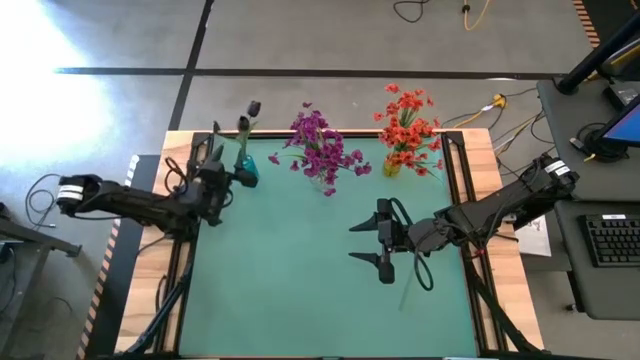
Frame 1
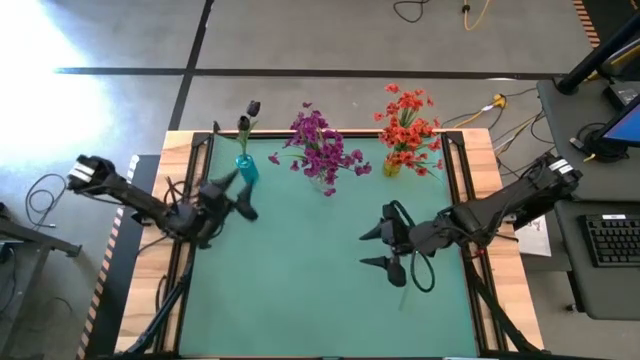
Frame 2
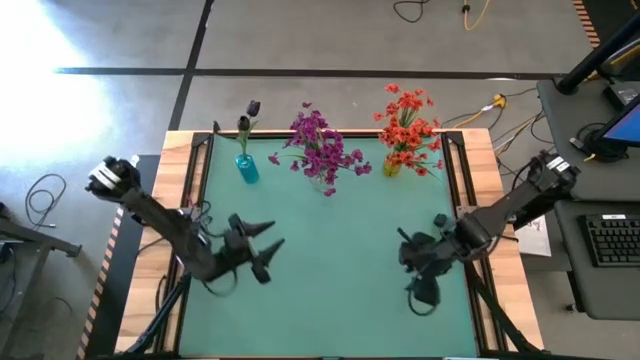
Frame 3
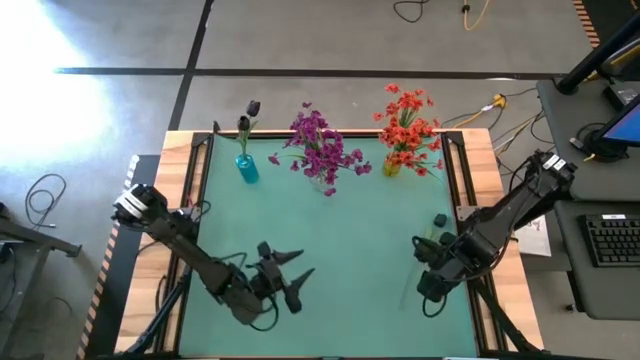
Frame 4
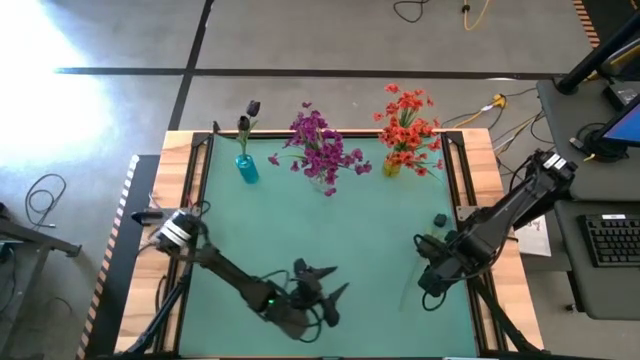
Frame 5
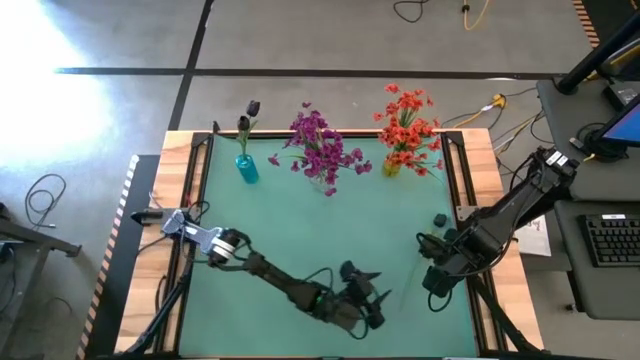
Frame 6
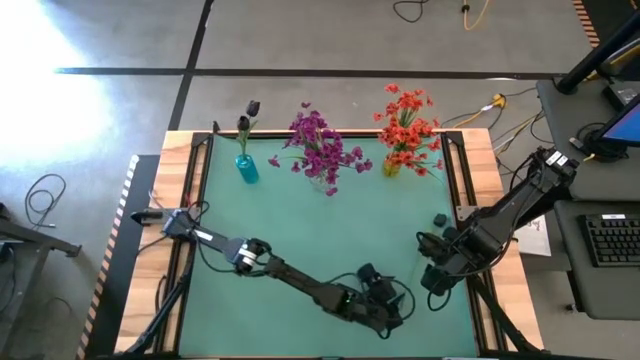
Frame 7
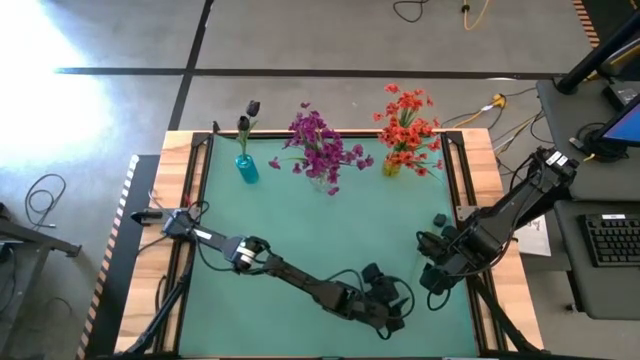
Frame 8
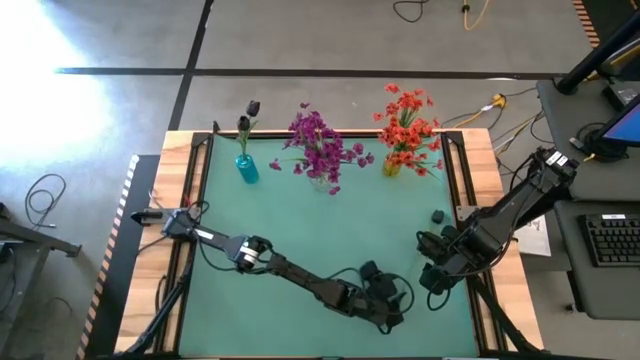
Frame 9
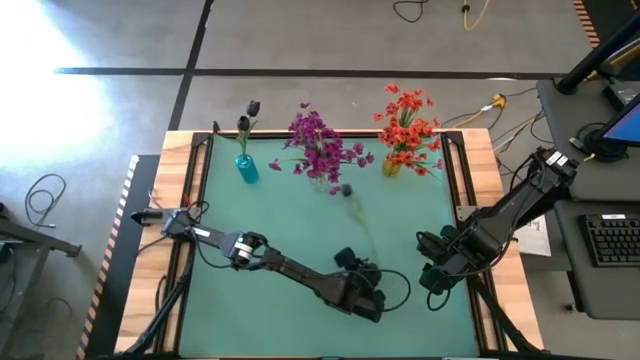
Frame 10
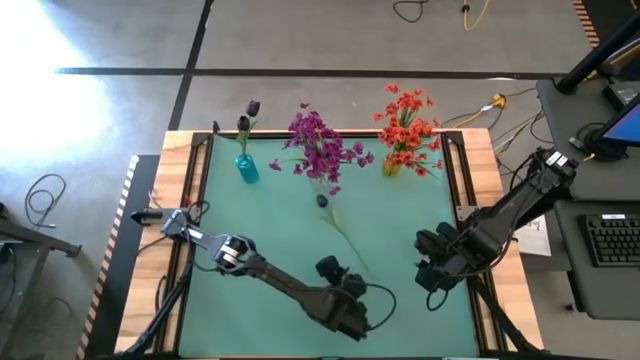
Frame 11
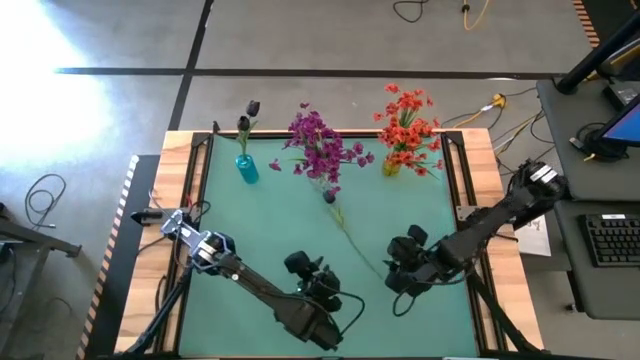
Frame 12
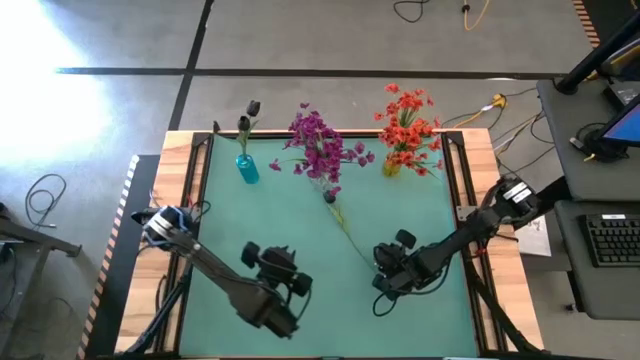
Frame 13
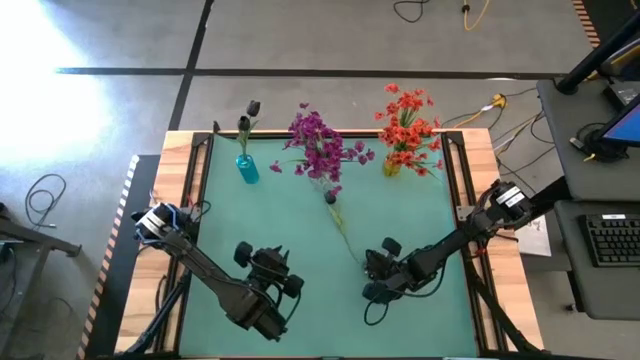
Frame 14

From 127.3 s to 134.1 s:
Task: Sort flowers into vase by color
Put the black flower into the blue flower vase

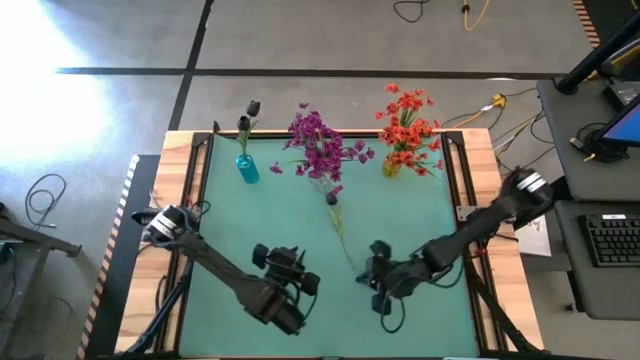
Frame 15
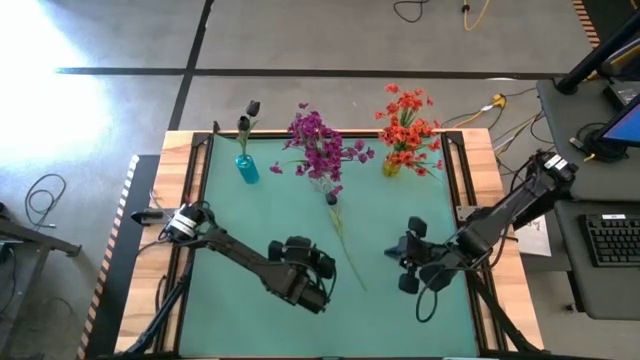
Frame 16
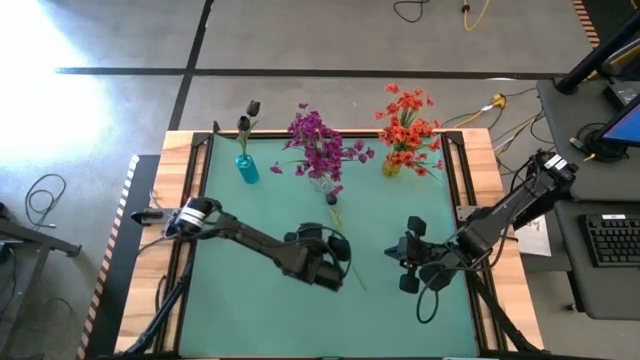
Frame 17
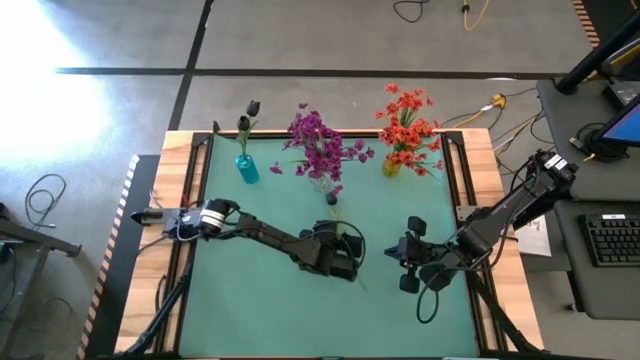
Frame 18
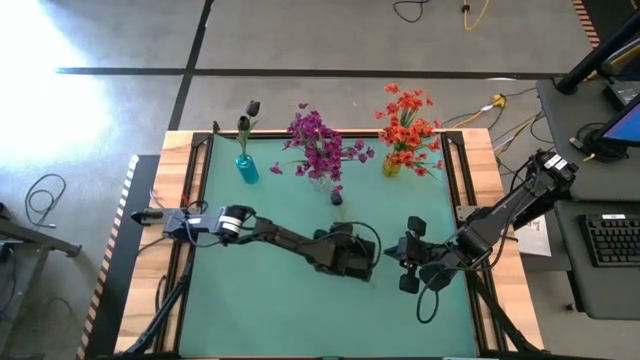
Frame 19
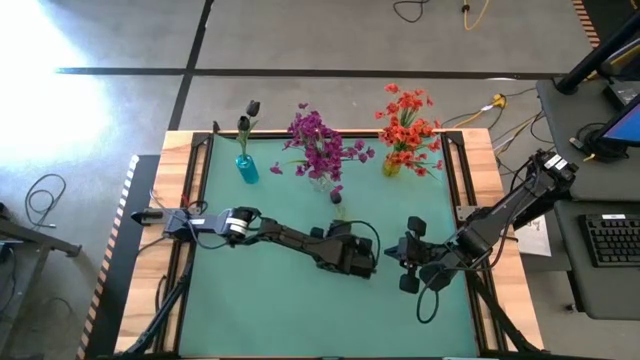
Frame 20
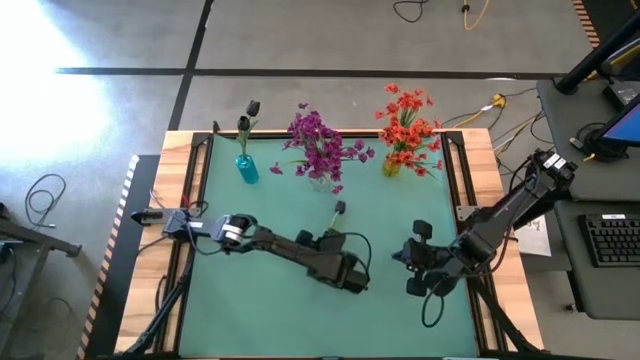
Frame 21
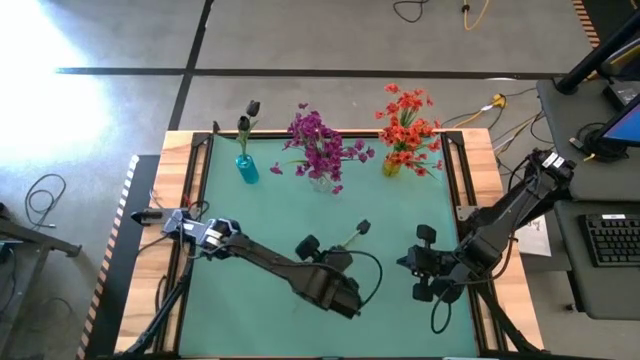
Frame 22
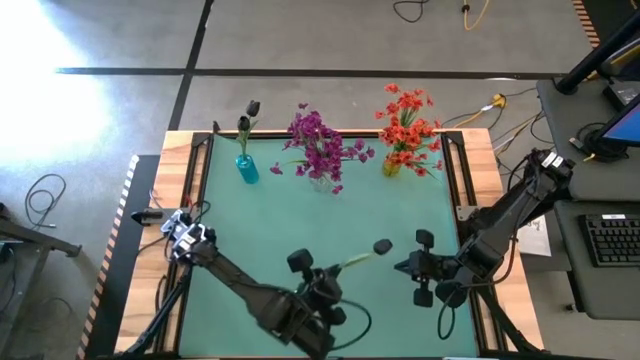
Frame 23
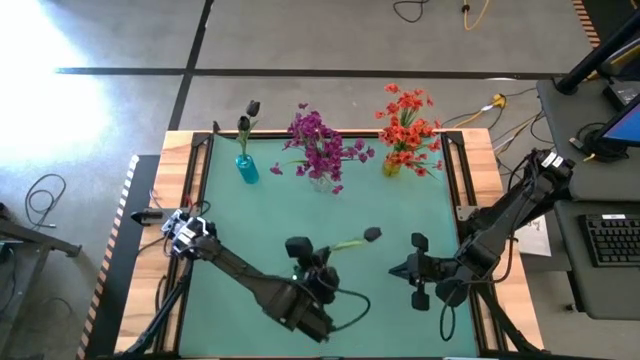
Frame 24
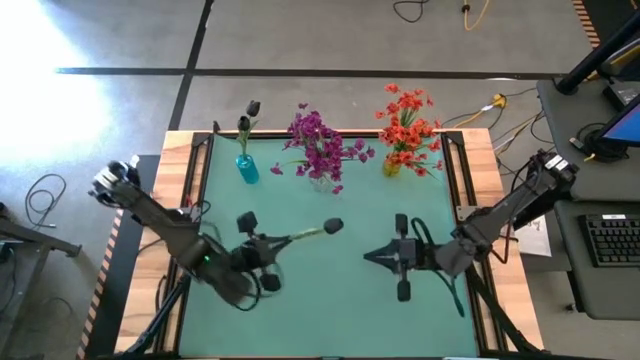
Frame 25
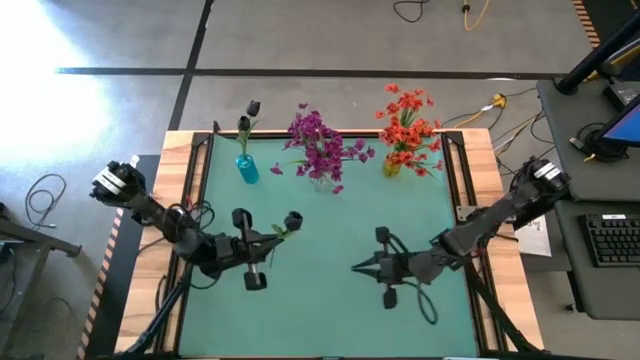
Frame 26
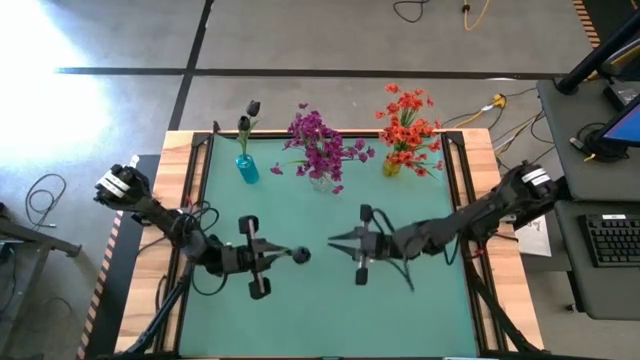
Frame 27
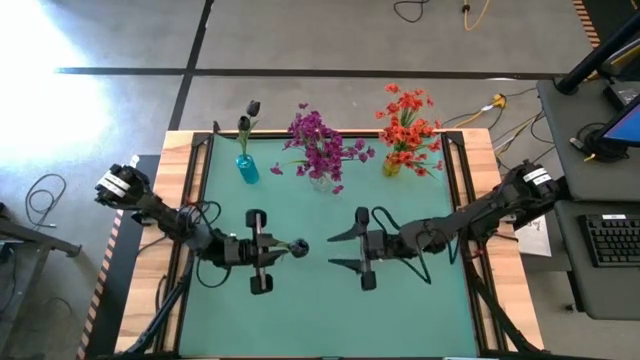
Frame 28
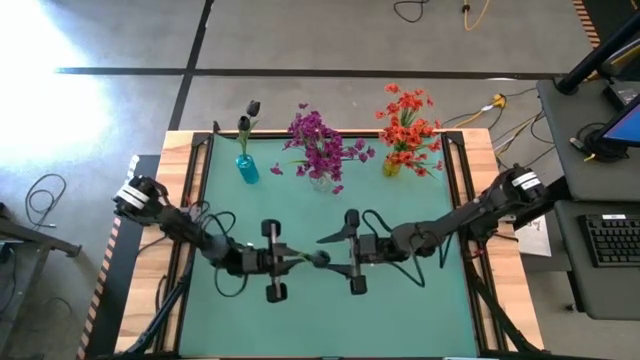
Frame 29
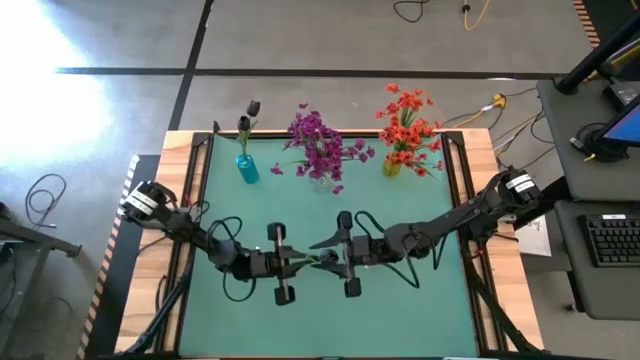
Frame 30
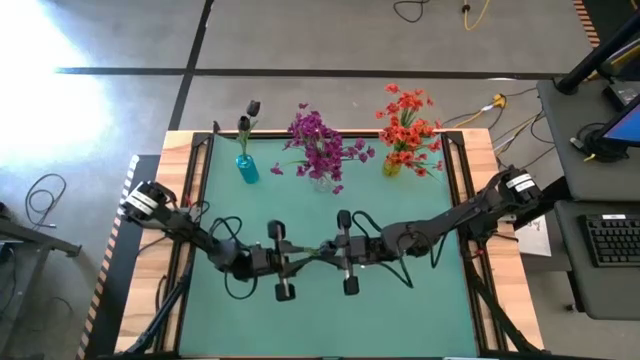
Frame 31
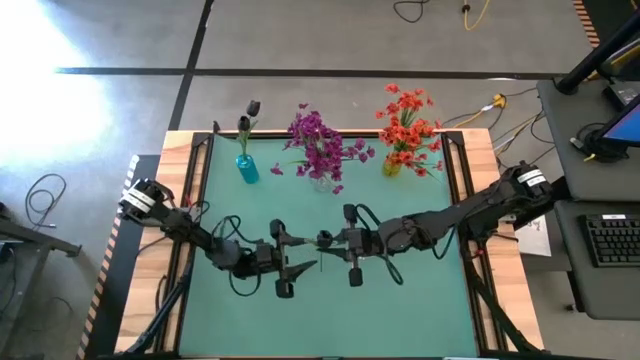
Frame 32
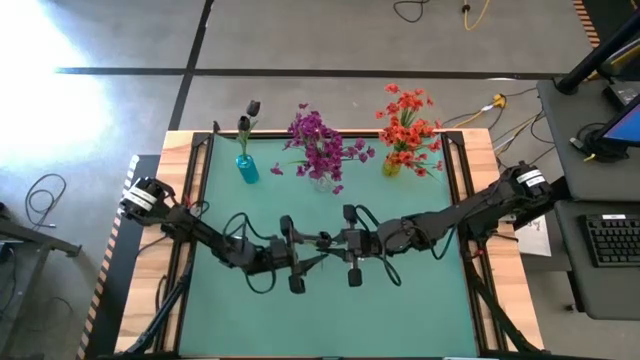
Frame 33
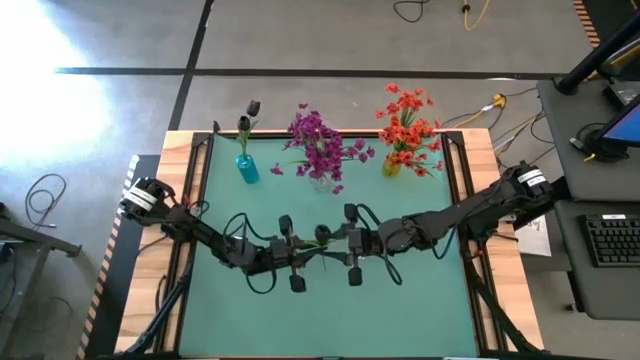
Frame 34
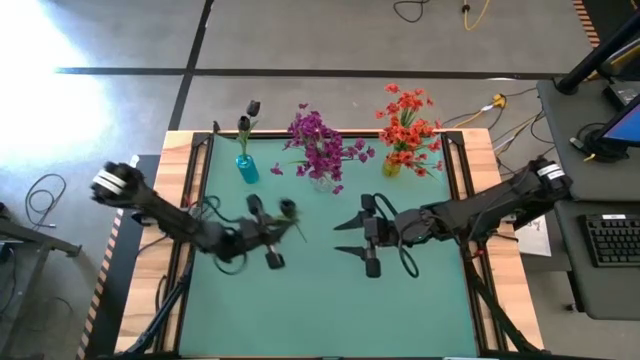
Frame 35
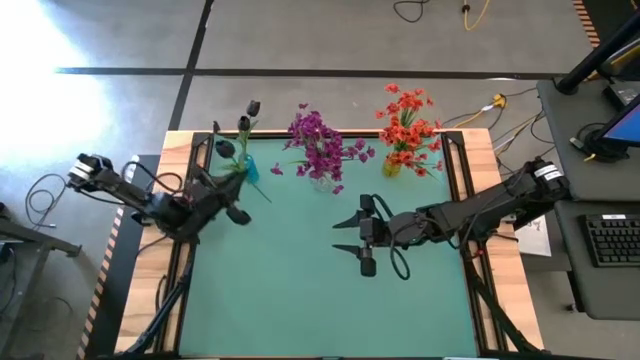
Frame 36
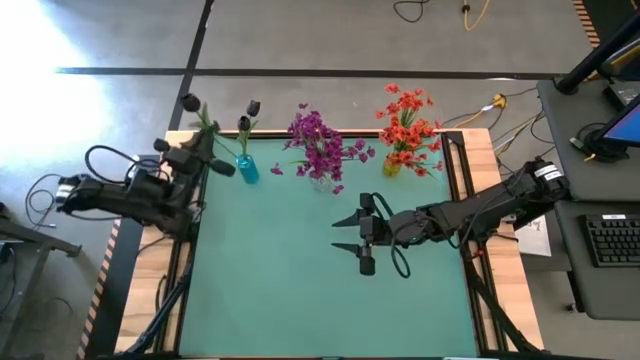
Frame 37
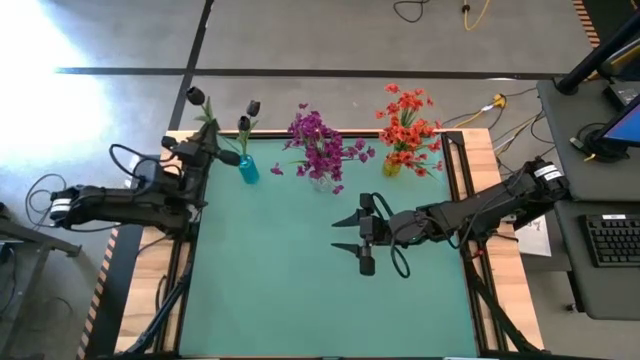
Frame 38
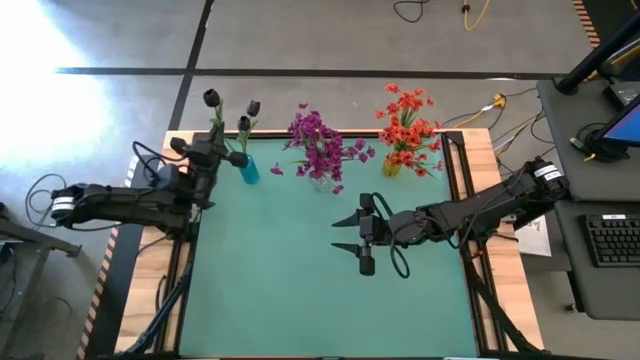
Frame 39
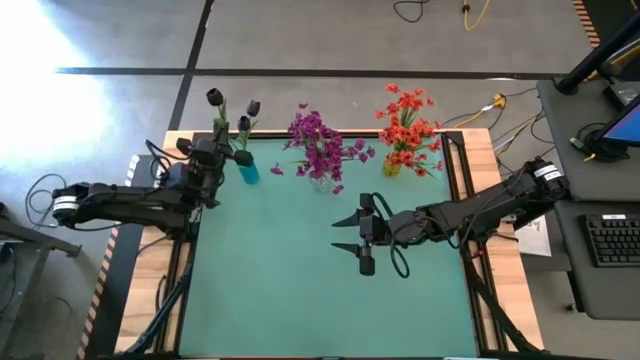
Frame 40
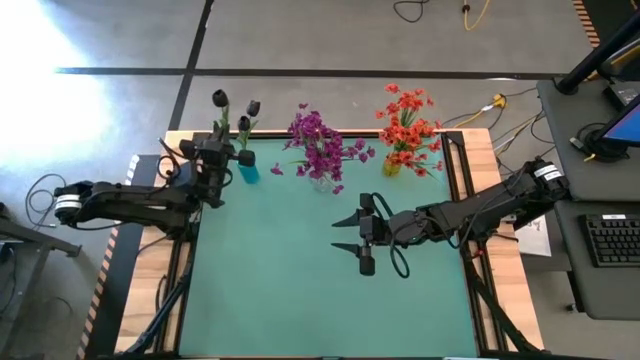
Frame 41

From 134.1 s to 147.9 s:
Put the black flower into the blue flower vase

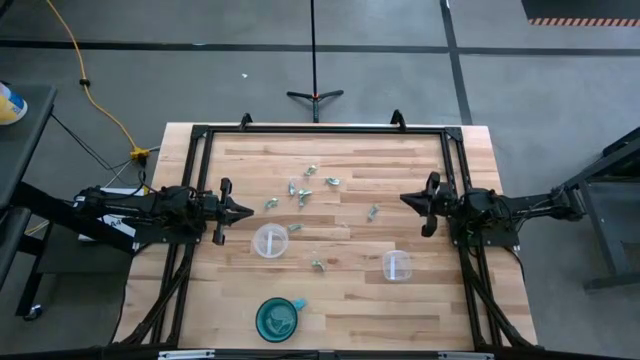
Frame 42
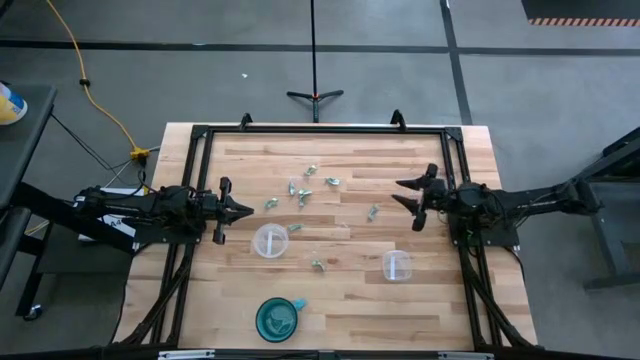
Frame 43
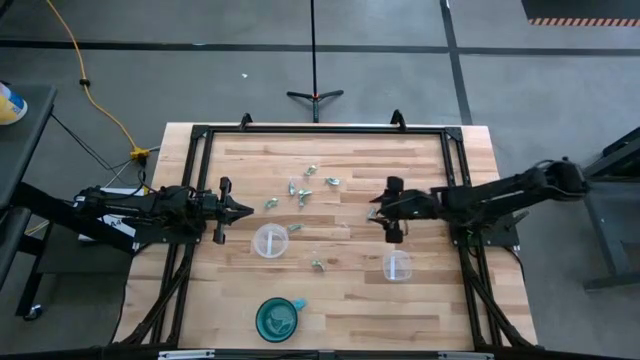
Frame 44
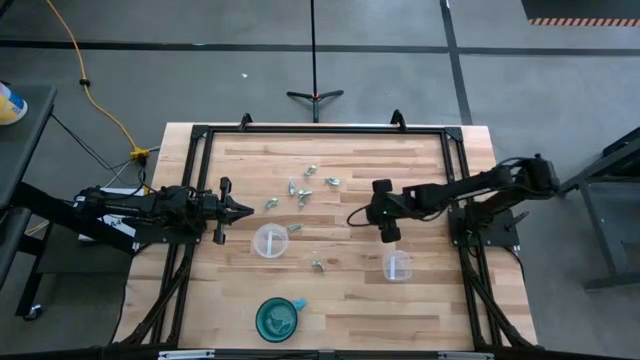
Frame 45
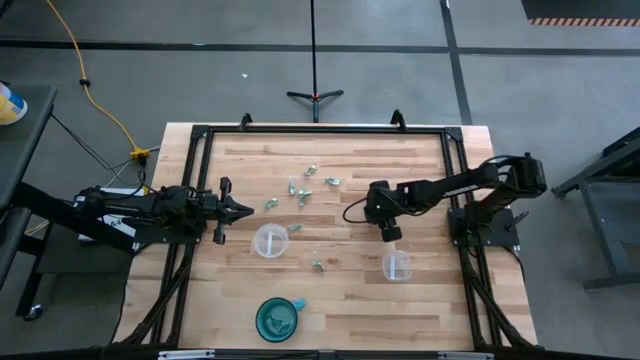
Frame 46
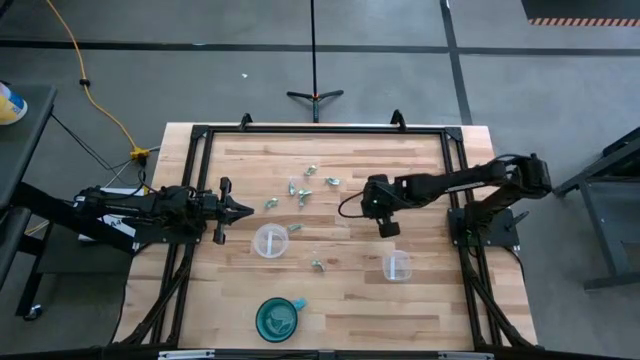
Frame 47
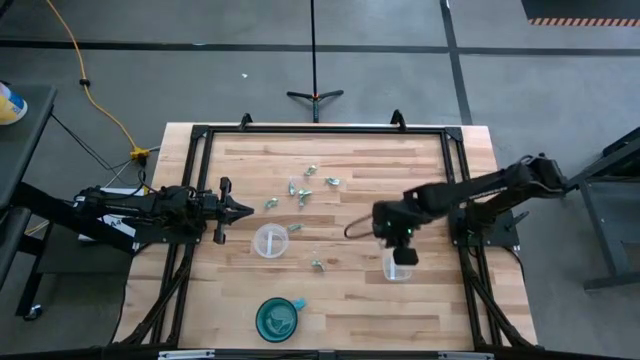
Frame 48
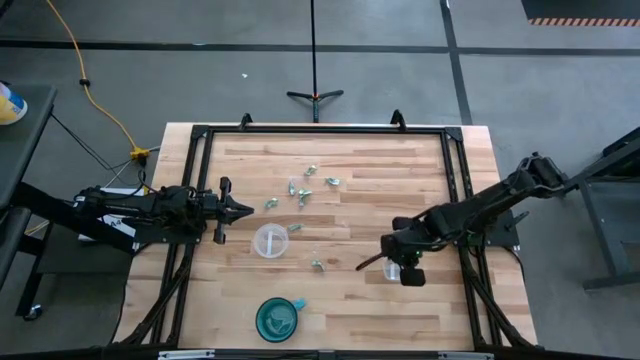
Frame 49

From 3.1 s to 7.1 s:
Task: Sort candy
Put the green candy into the square transparent bin
